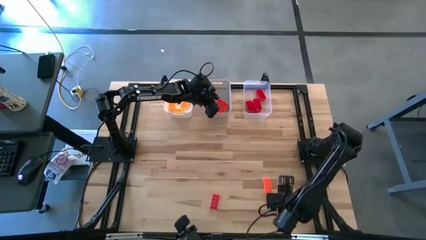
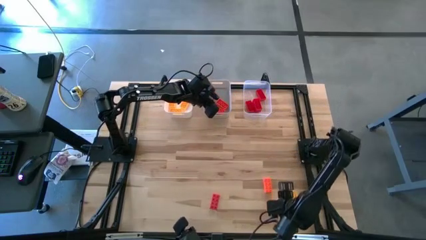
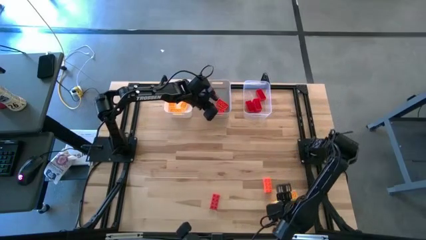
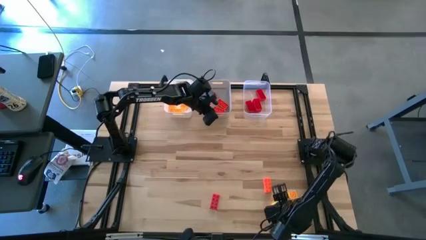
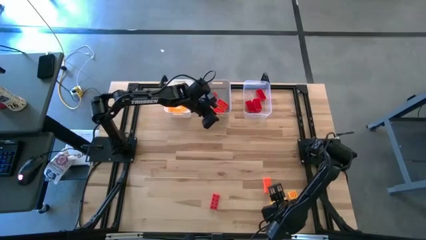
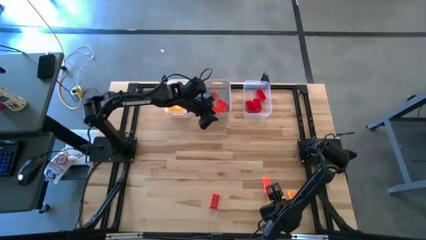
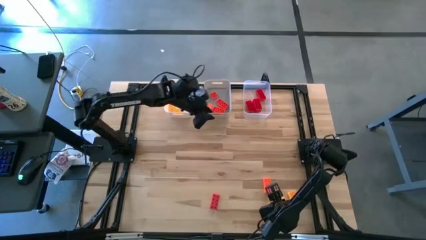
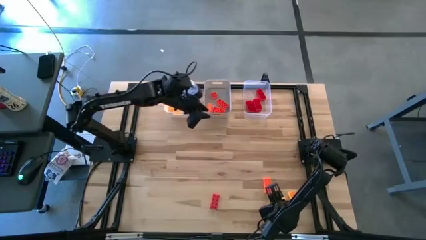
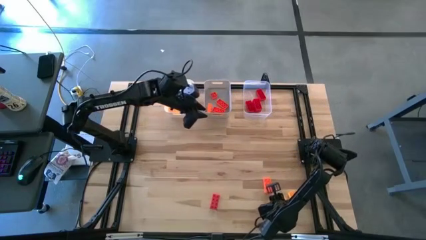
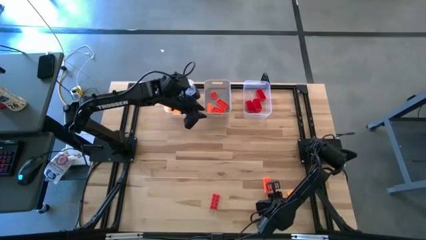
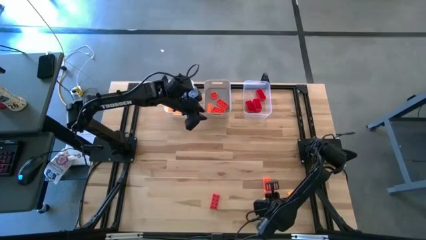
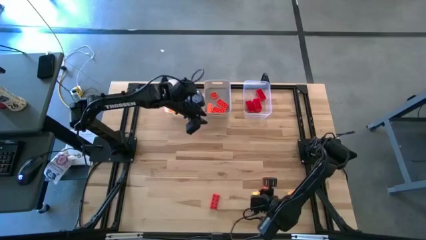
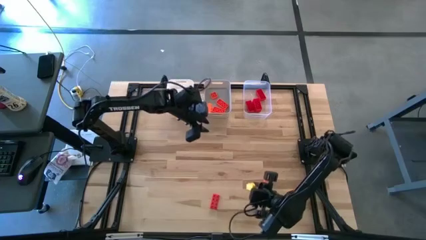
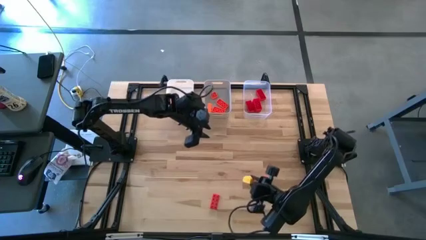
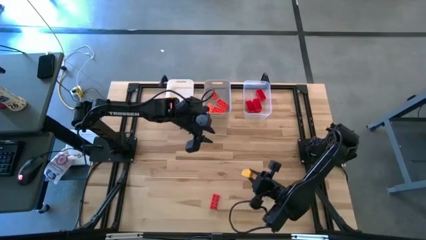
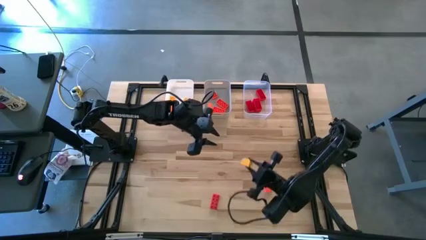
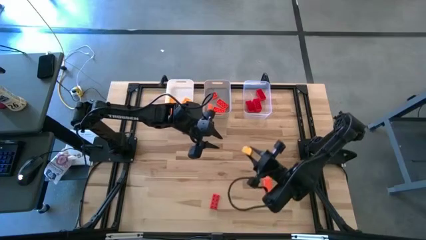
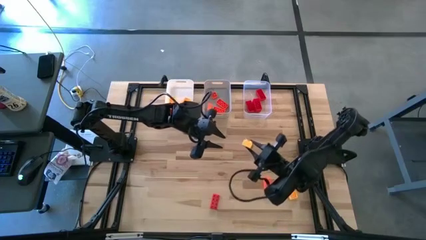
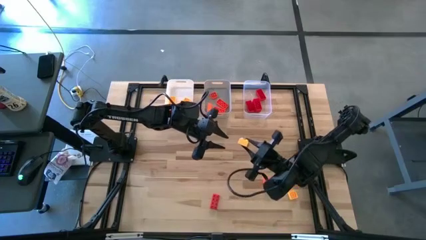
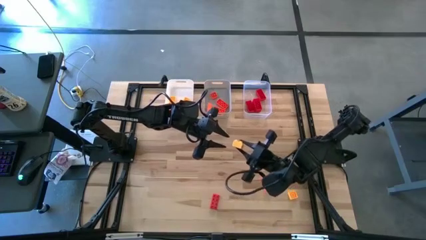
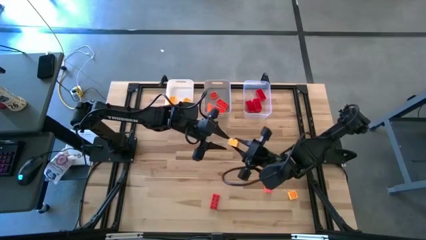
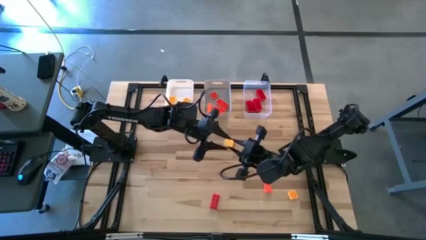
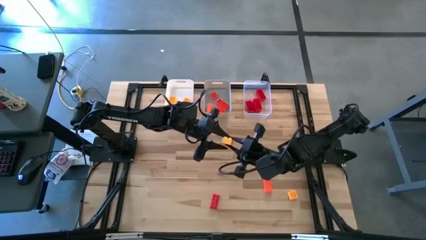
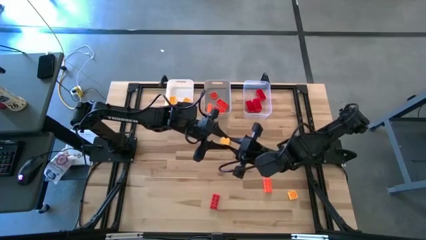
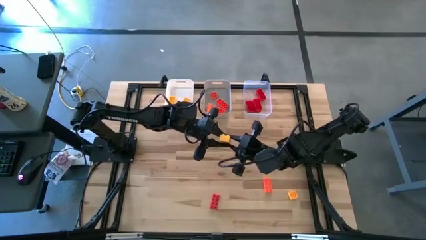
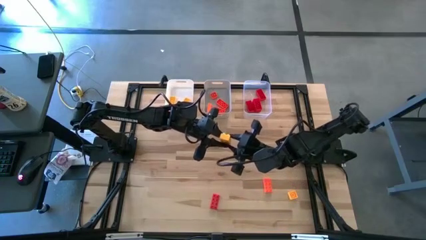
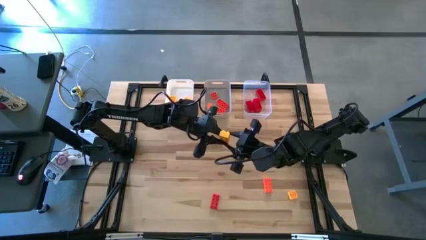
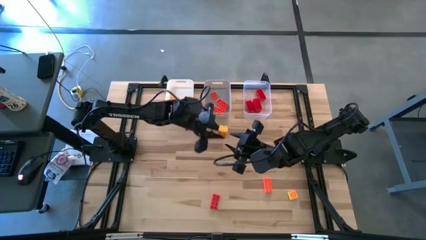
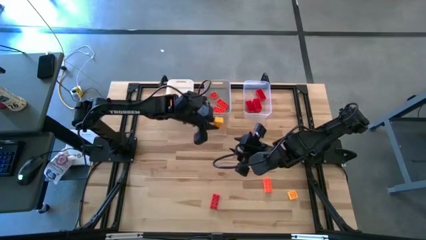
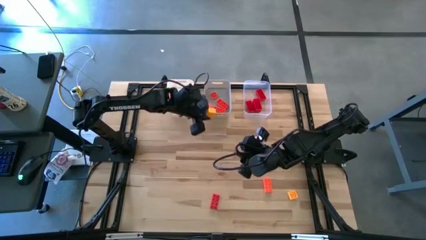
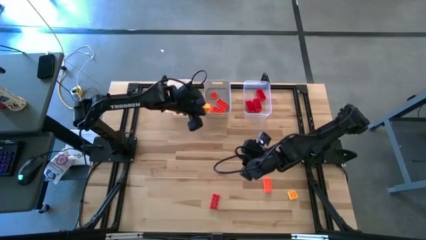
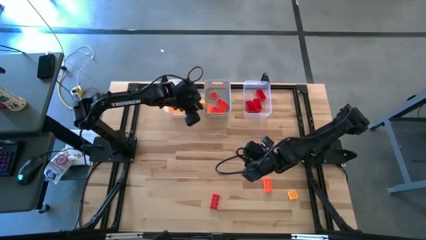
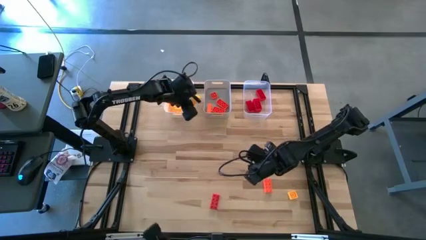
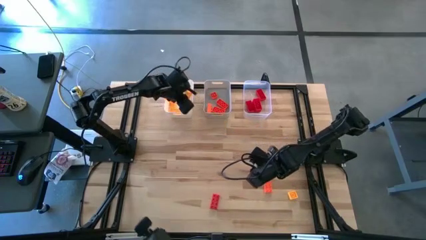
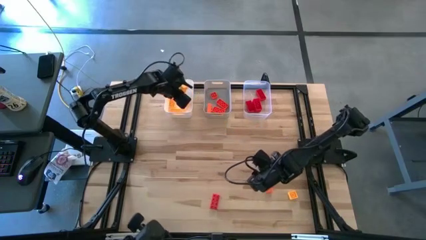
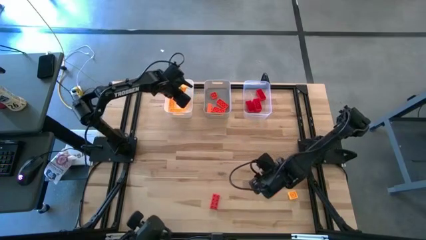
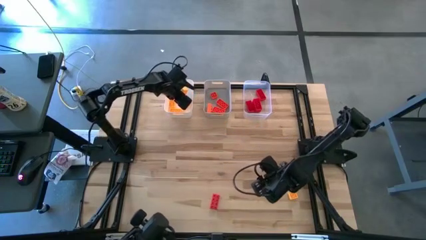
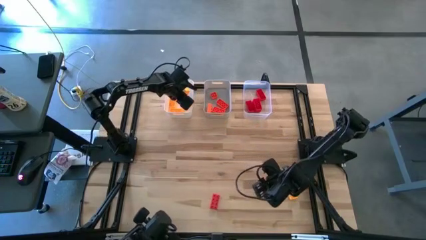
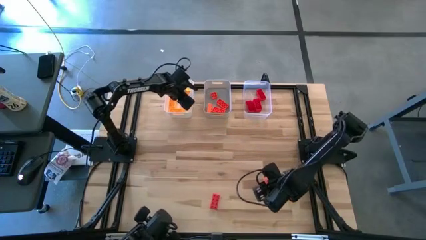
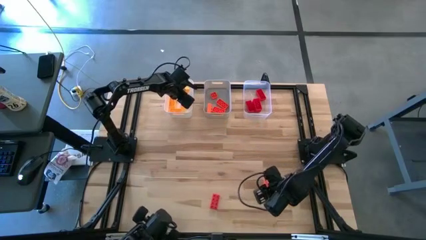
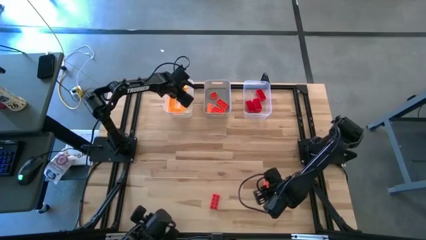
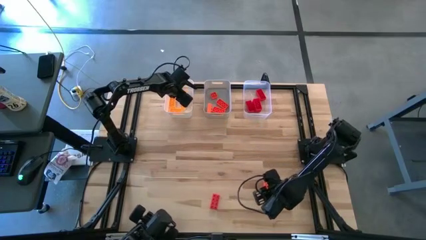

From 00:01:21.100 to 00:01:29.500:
Task: Sort & place blocks by color
Put the yellow game piece into the white bin

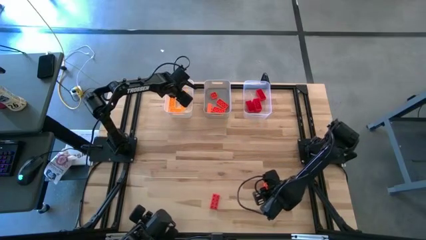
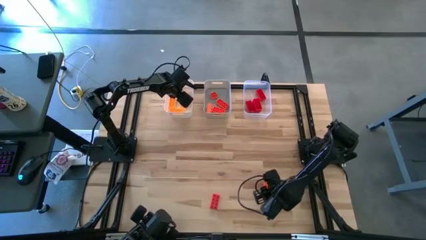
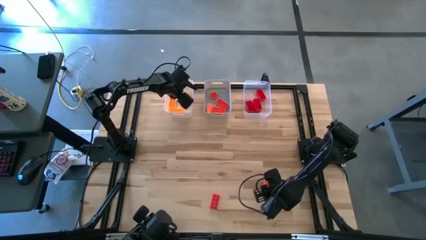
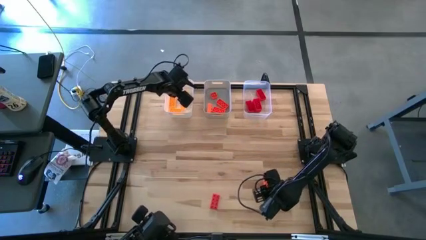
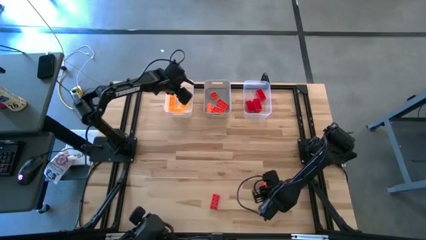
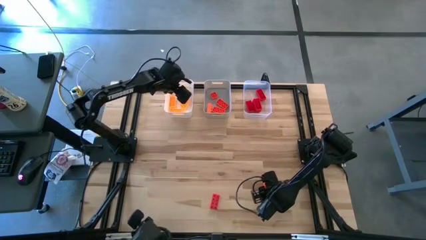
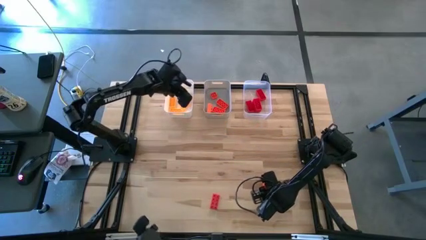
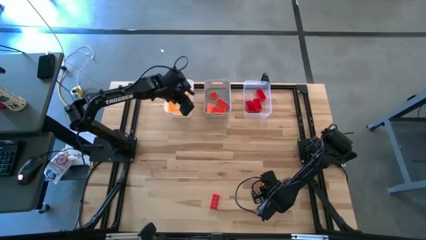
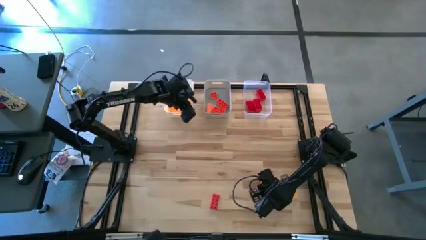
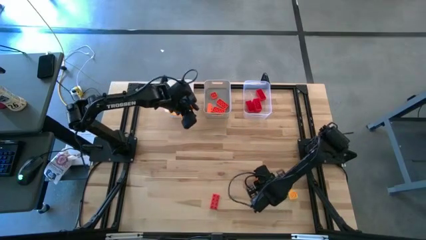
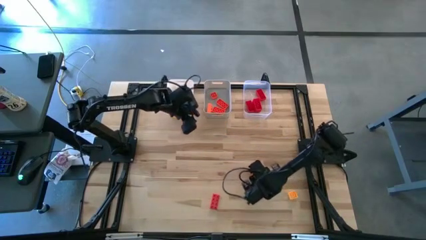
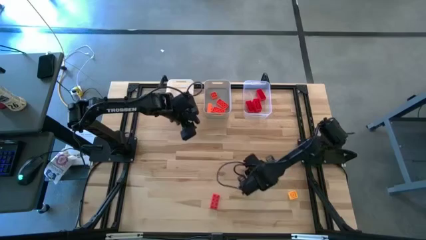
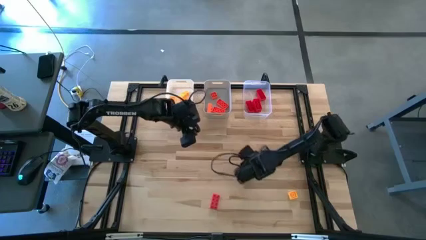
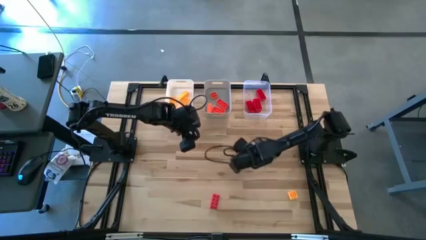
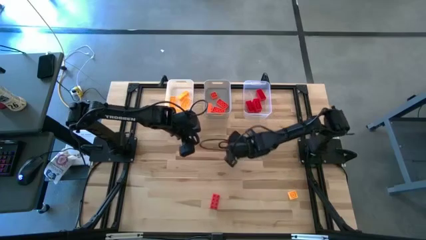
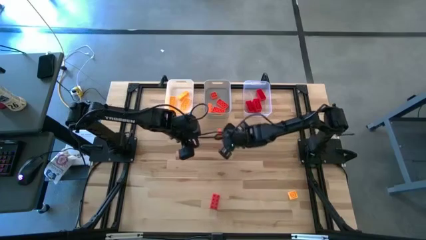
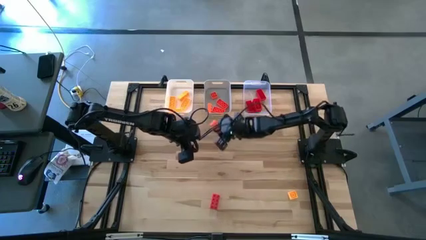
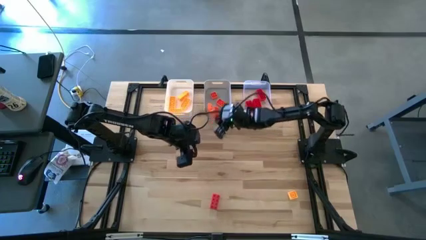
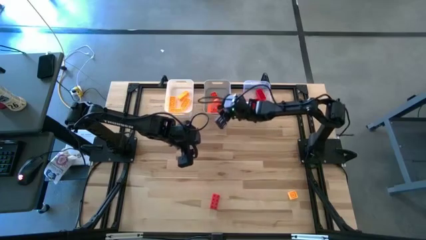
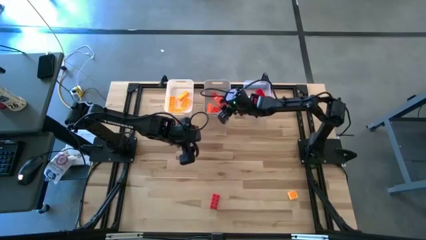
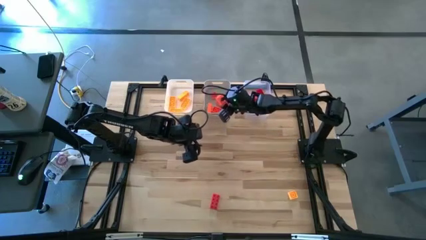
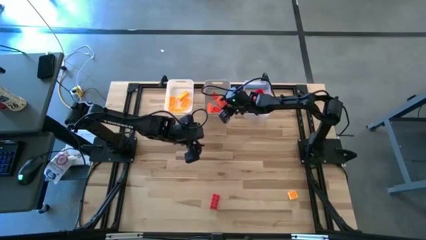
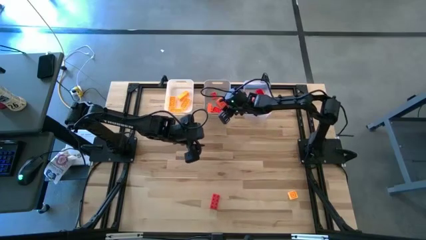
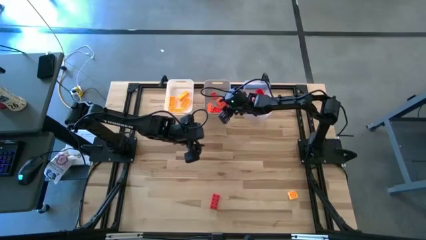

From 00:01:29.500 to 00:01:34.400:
Put the orange game piece into the gray bin
